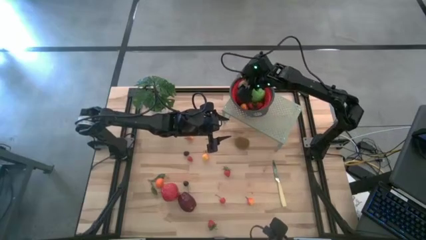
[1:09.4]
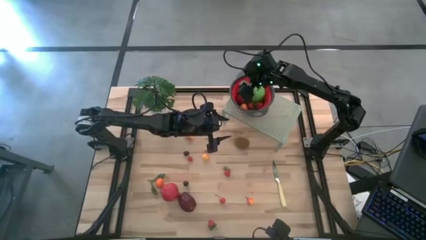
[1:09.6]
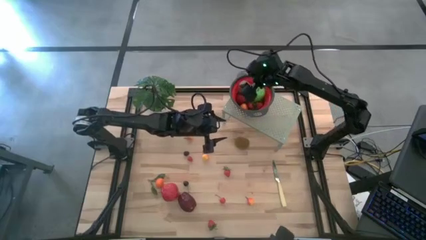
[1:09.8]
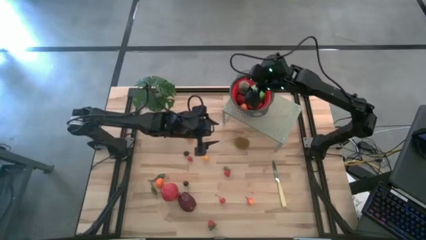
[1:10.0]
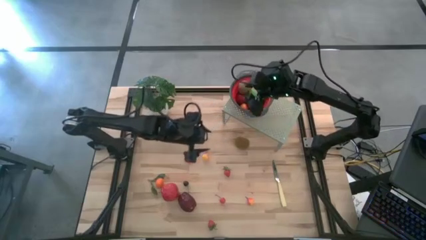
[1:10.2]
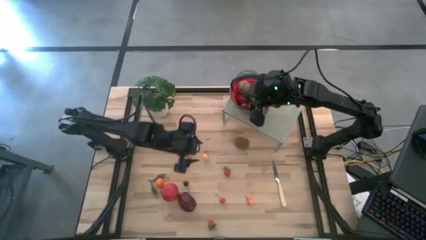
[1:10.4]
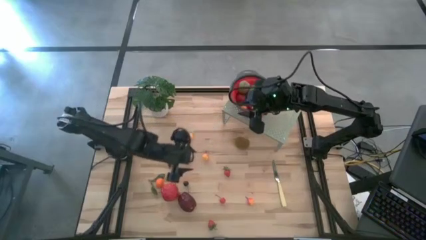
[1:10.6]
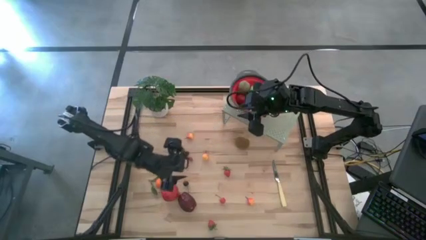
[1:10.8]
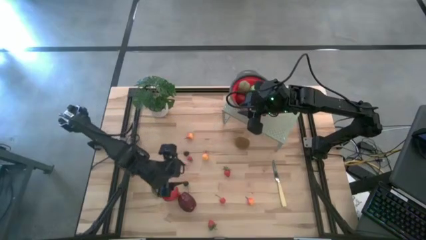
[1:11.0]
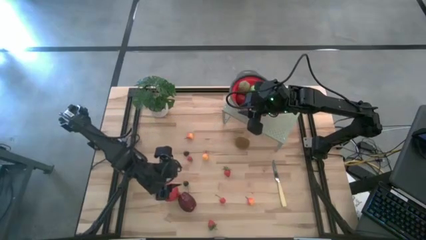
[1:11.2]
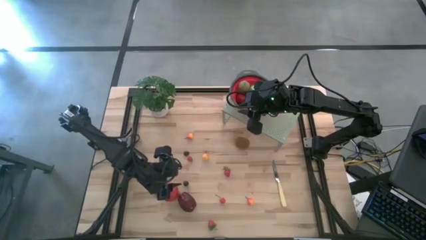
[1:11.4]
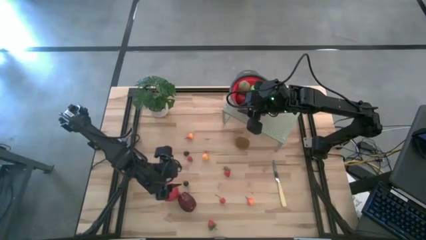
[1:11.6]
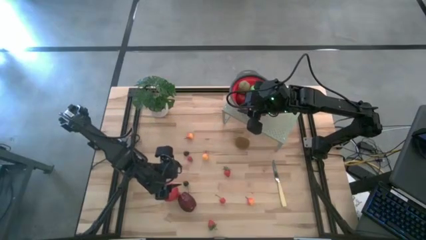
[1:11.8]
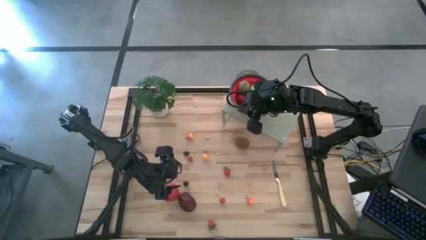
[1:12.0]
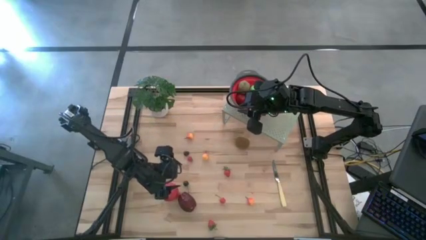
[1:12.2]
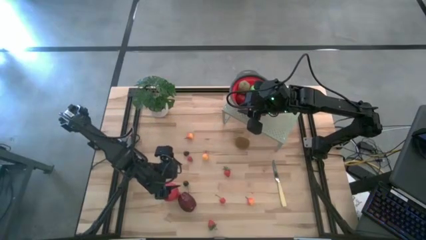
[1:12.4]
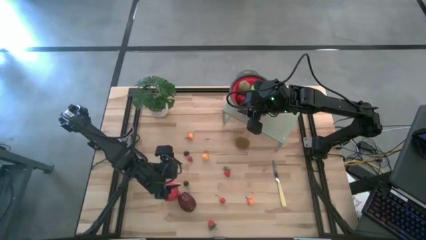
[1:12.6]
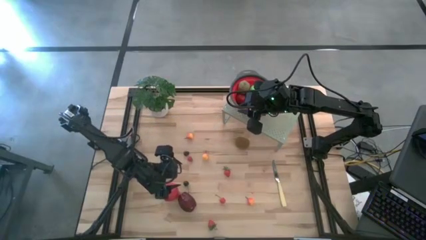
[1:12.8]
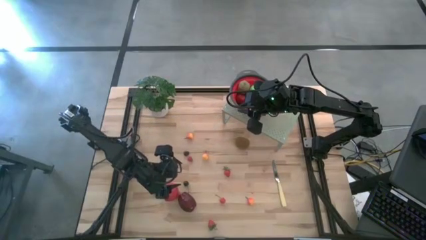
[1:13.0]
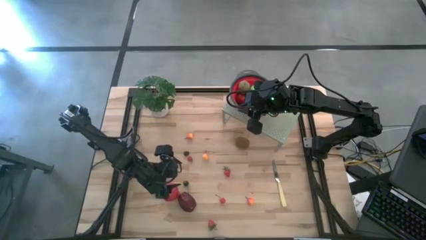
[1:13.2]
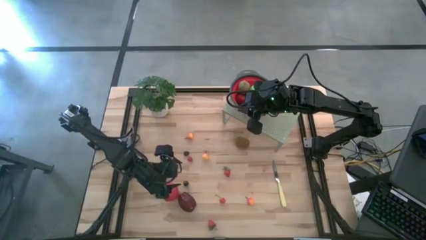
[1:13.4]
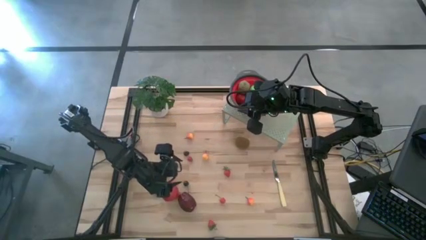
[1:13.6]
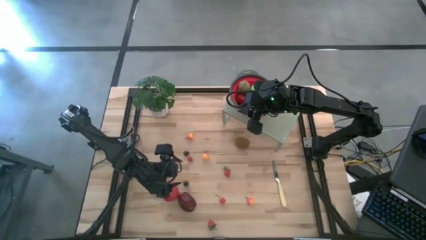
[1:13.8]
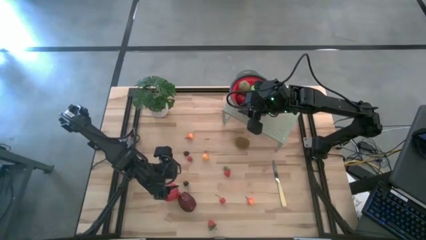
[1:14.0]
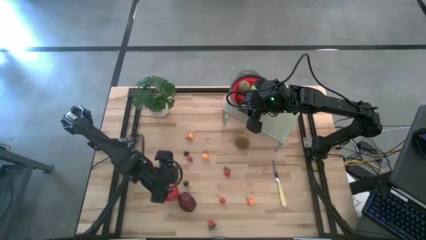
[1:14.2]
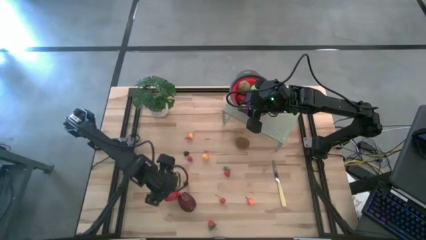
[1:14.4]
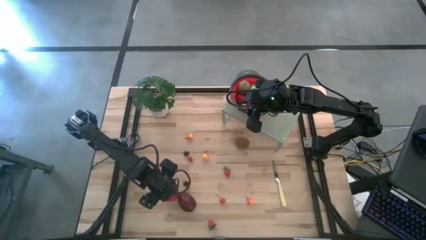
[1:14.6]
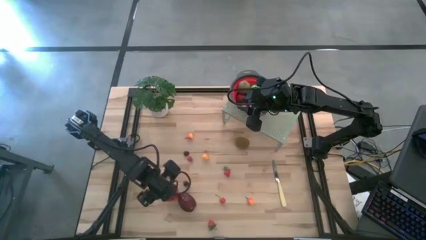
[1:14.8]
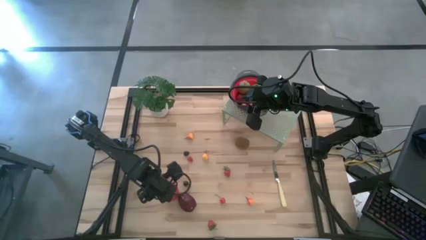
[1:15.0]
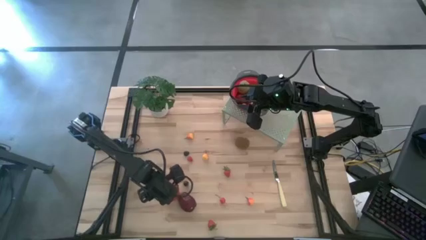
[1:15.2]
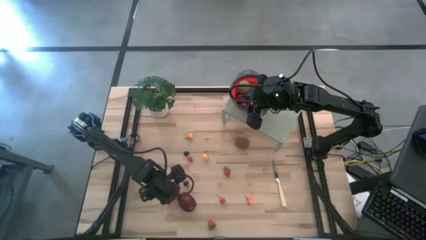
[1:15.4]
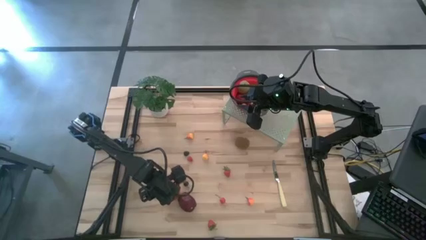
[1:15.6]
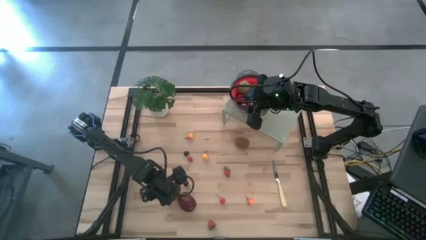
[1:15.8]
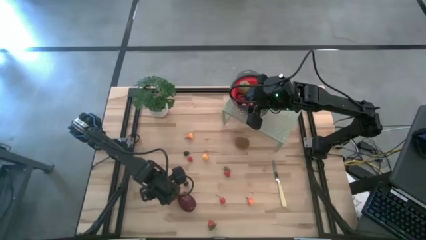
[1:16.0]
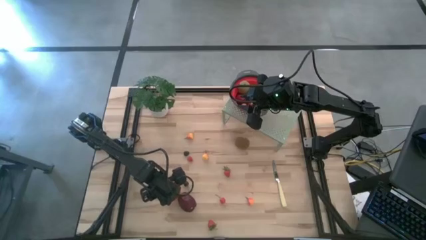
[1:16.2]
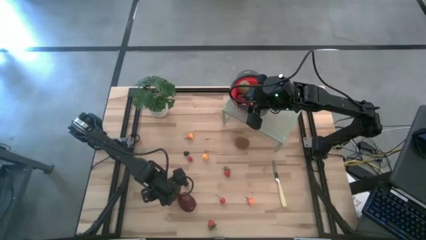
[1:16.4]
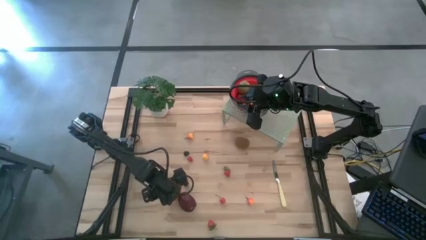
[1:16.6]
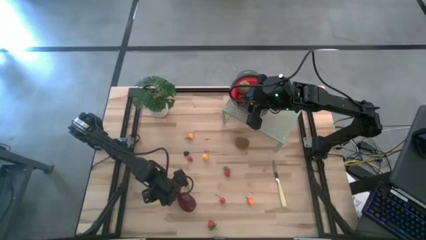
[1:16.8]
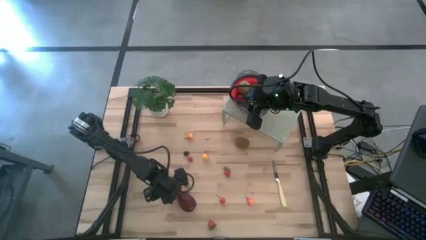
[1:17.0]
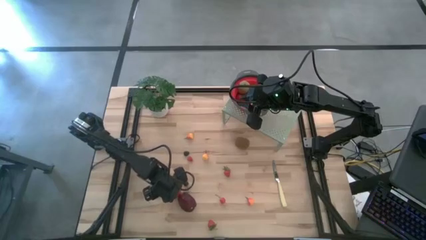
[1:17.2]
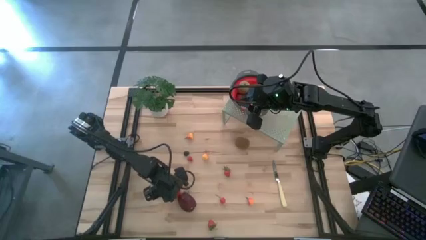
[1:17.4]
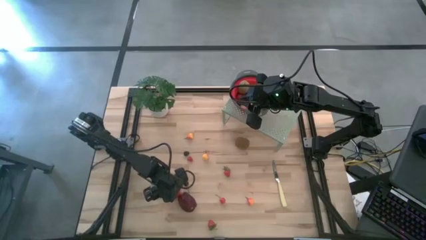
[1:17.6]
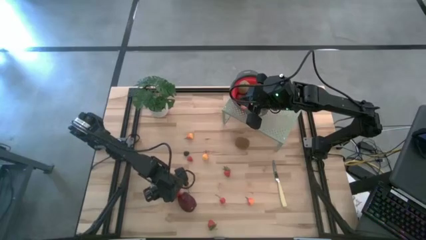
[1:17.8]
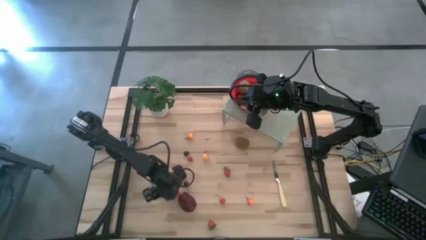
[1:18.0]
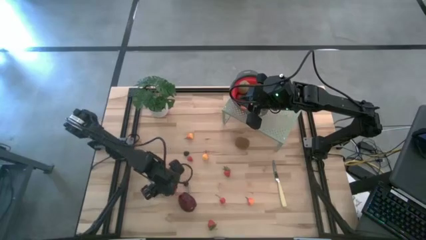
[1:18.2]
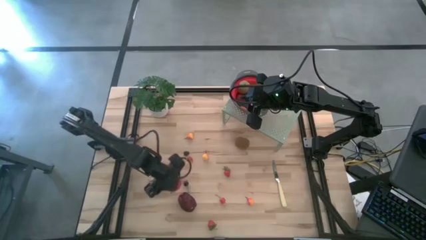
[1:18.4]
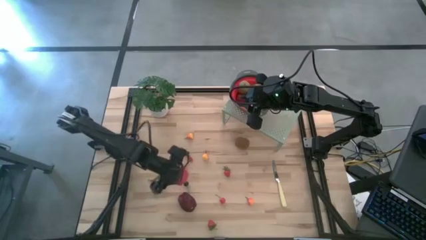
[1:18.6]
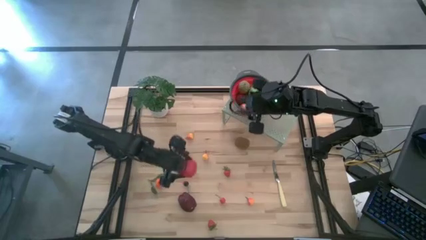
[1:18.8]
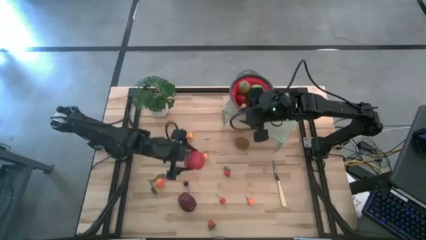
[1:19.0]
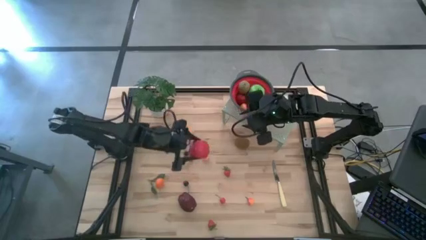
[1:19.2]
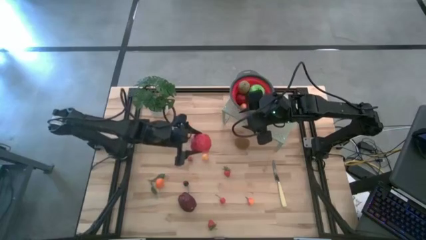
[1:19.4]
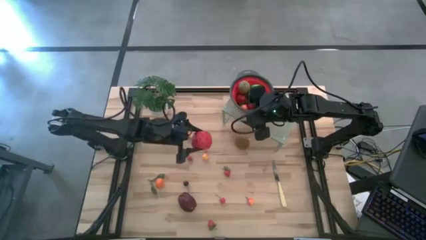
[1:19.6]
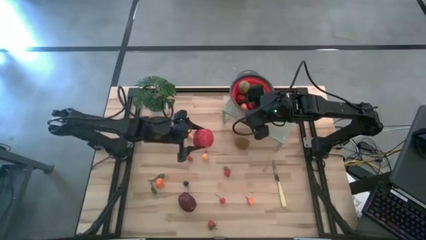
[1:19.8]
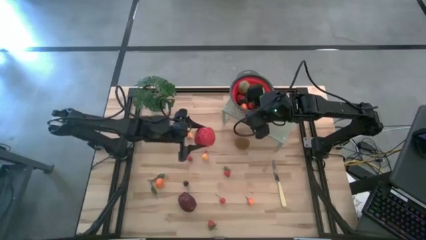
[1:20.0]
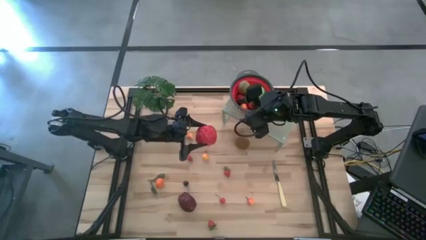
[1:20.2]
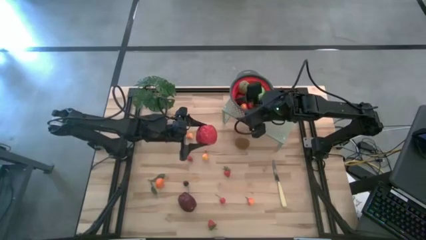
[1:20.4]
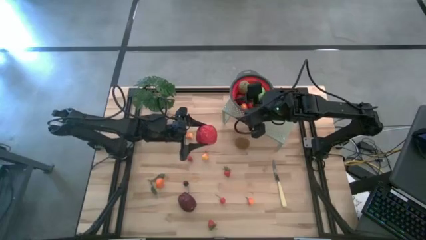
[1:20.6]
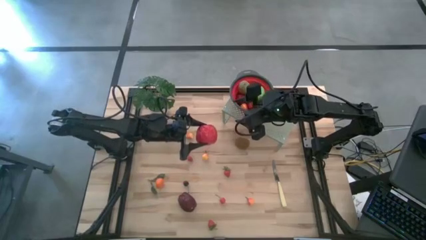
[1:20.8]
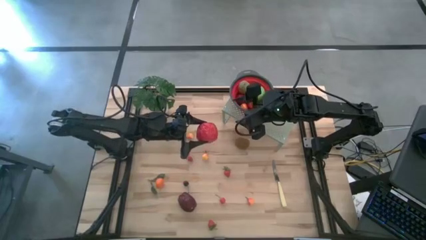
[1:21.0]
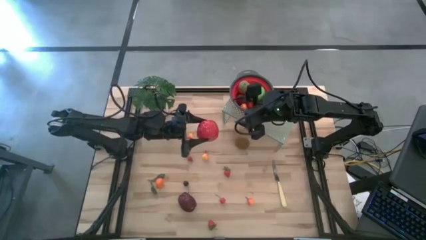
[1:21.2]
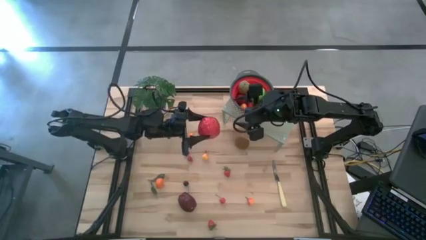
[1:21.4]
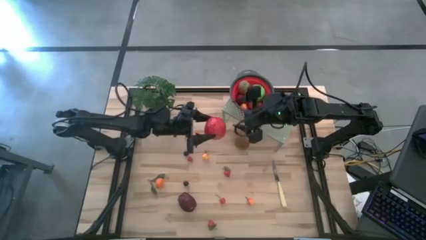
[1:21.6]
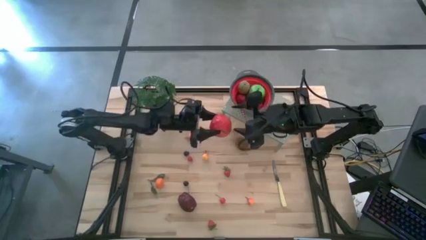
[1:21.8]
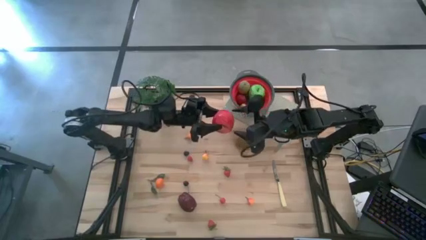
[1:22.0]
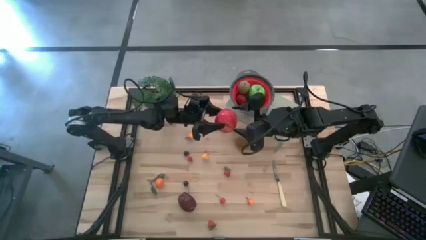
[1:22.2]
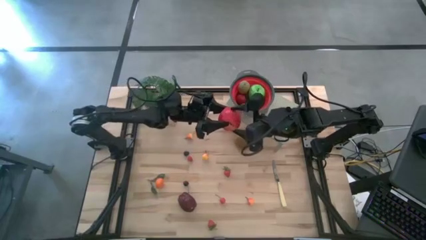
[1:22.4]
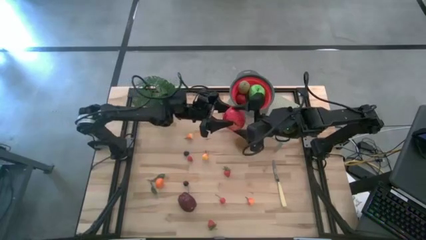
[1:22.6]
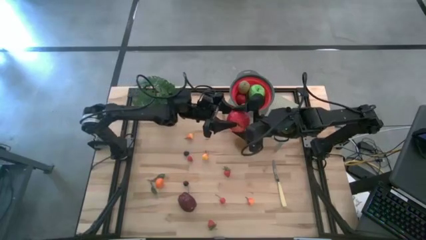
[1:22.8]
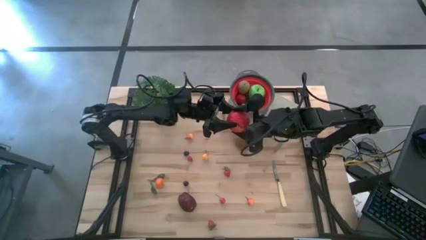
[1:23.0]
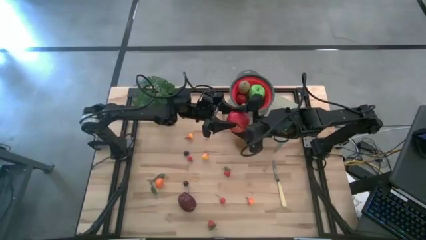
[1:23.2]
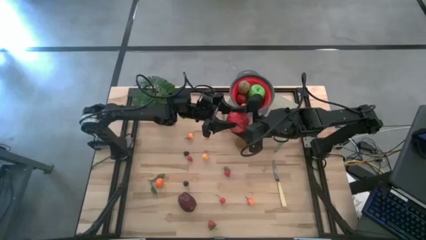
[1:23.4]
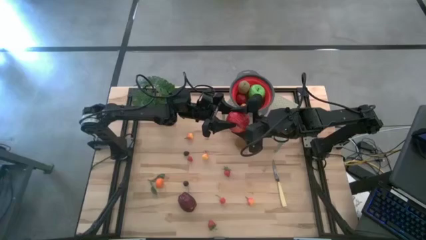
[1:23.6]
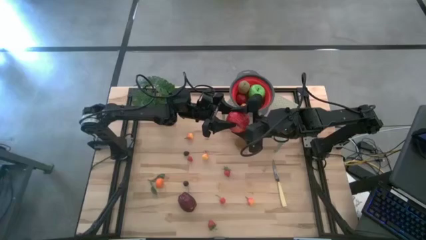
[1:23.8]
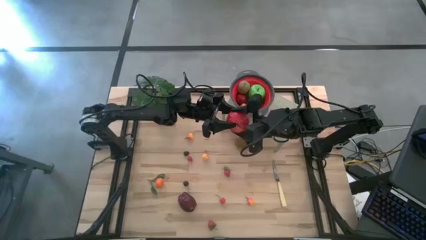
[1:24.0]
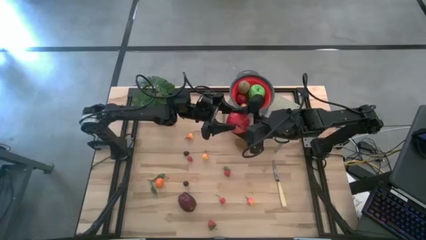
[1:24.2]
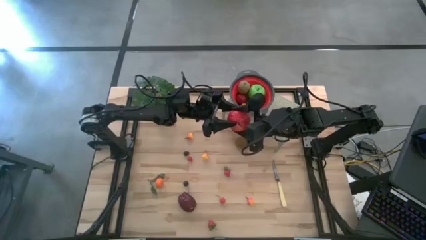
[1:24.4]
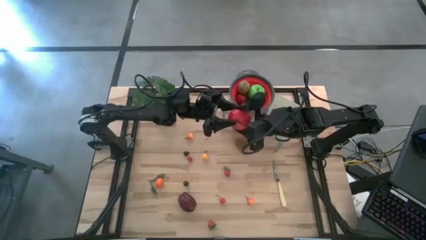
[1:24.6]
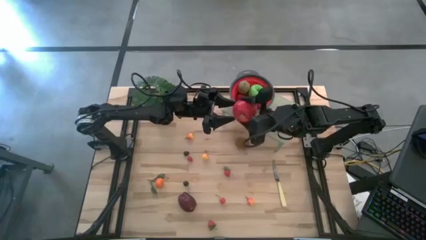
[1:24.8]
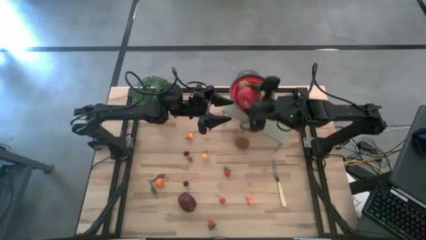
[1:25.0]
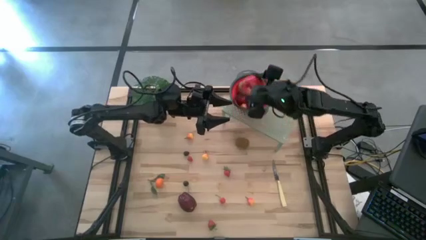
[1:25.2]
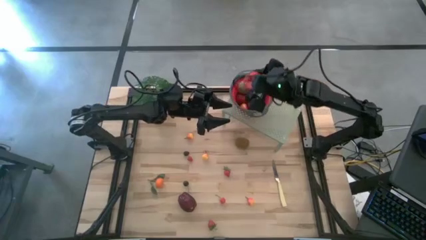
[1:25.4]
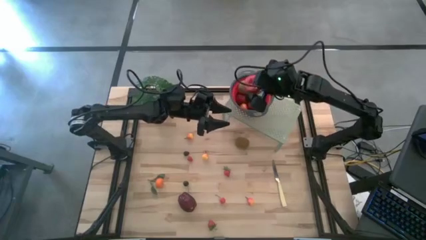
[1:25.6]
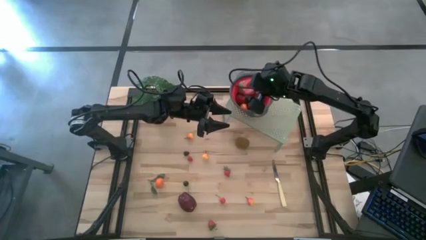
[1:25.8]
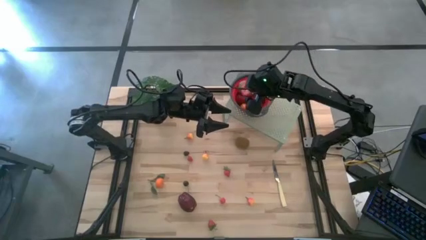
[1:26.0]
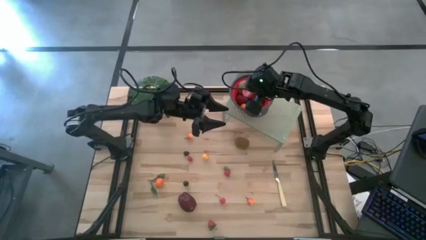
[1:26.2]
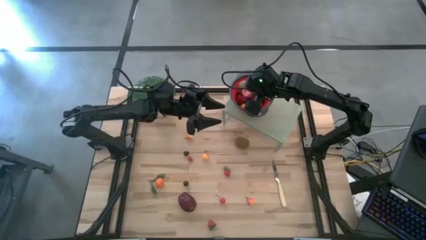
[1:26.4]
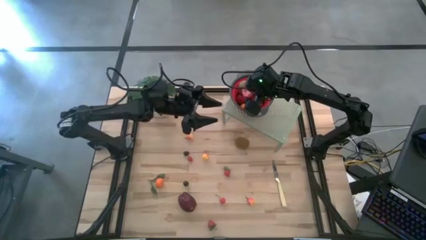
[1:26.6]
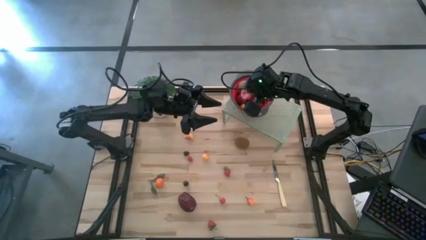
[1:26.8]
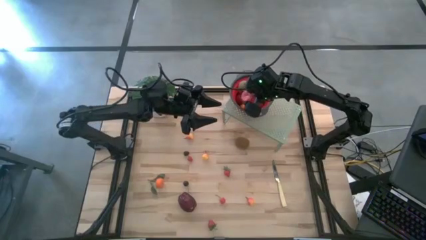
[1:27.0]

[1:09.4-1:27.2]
Task: Pick & Place Fruit
Put the red apple into the red strainer bowl
